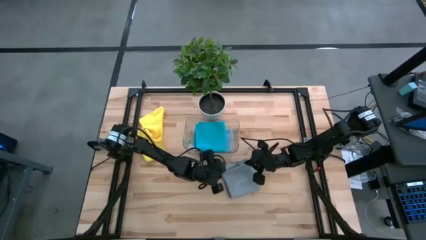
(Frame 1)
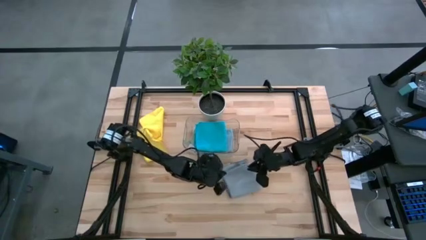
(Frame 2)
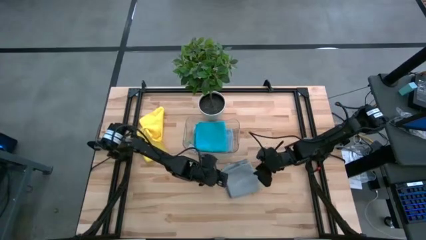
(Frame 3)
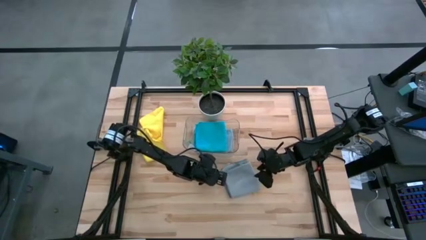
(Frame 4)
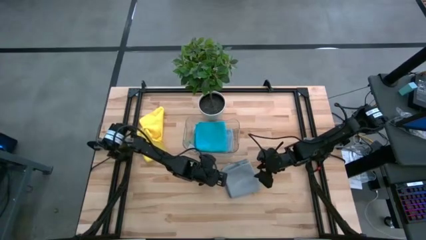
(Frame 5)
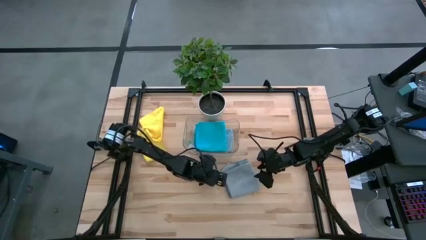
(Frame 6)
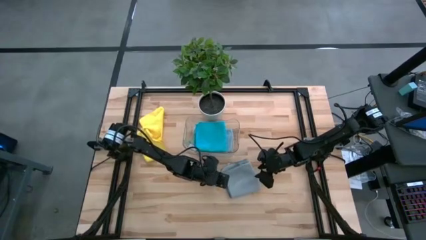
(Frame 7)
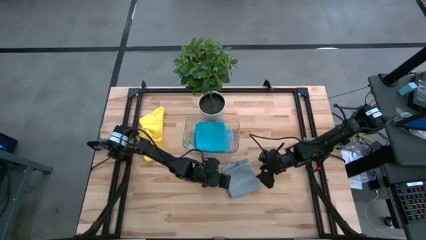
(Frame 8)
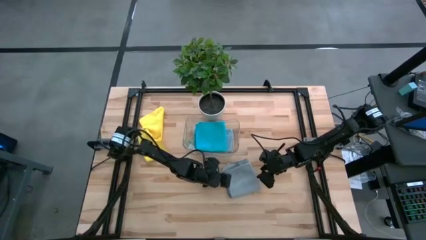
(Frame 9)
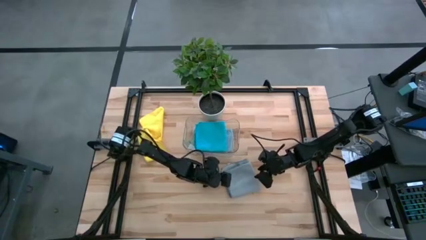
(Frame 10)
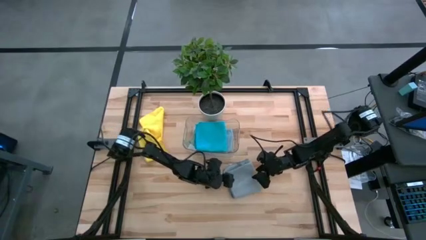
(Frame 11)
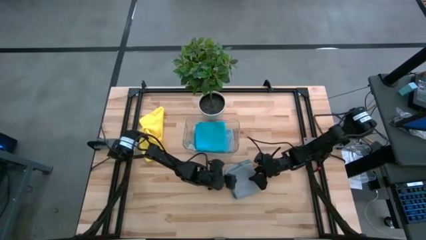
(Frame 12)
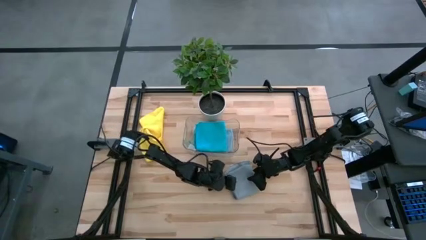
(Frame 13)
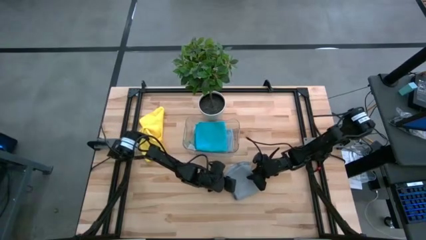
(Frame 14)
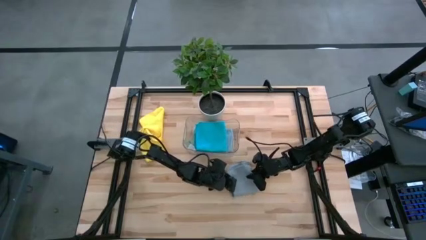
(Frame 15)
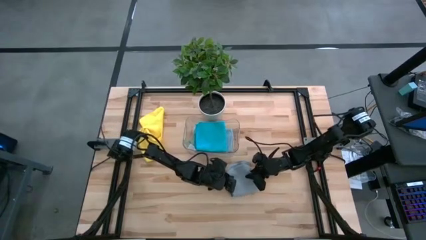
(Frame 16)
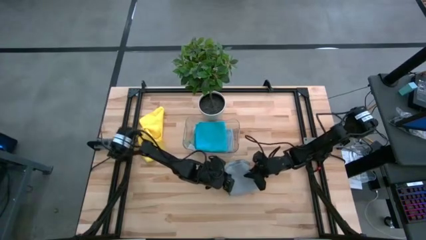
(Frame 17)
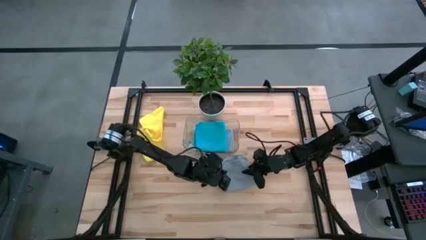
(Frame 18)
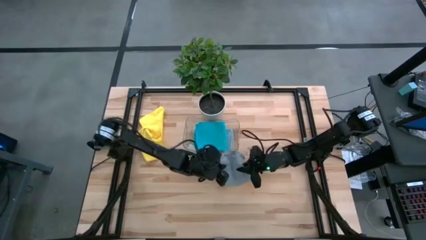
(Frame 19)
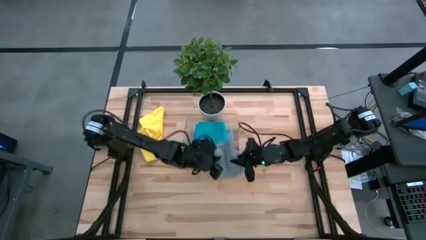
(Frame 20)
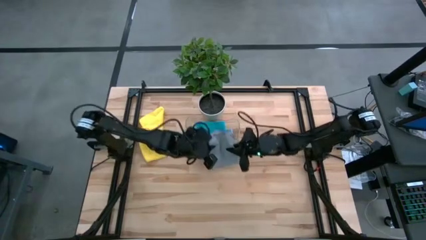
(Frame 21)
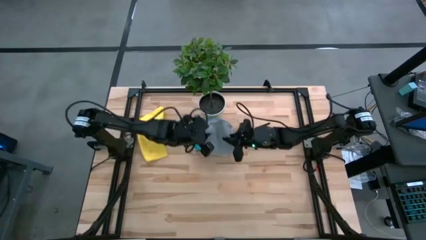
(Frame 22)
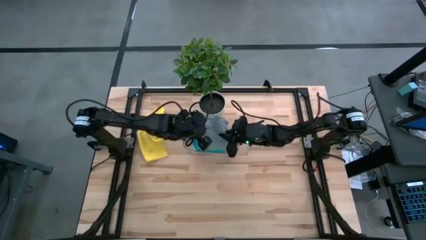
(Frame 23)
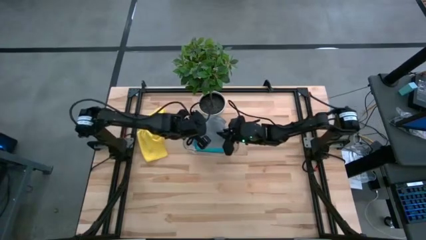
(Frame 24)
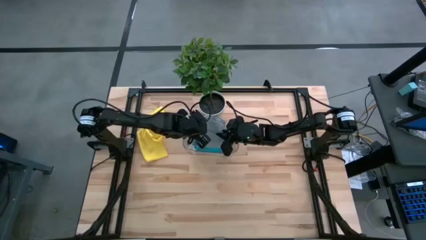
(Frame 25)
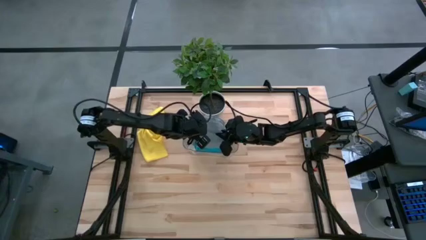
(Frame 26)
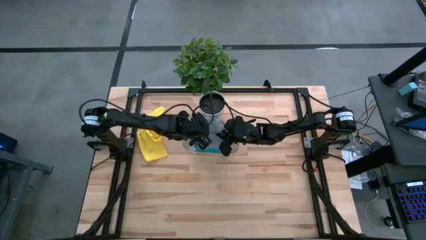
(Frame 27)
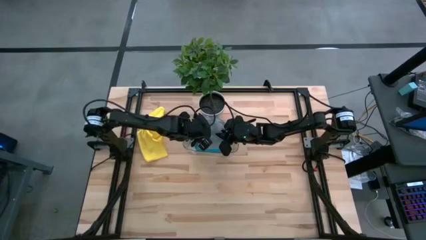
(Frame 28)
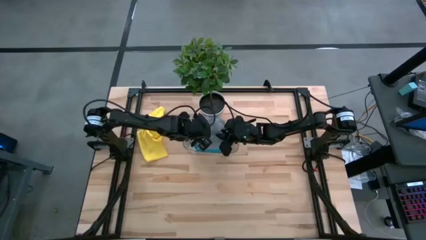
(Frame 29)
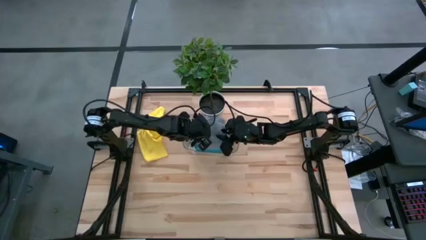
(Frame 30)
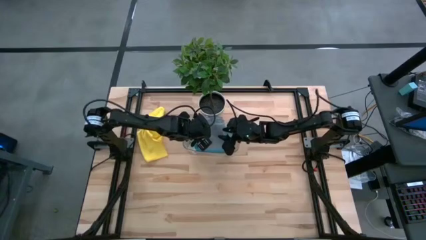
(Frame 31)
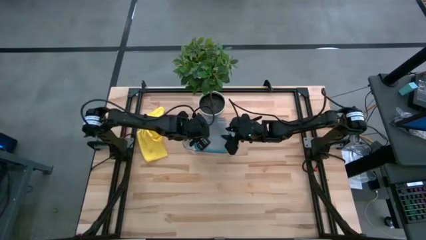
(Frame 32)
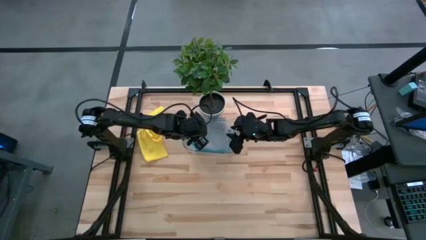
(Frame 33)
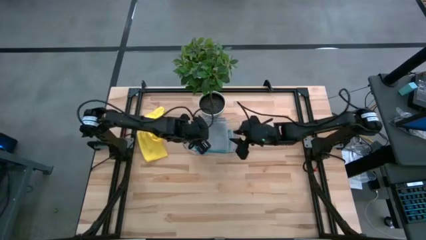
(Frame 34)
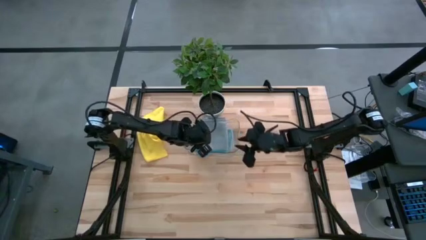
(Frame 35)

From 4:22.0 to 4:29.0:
Task: Fold microfiber towels
Stack the folded gray microfiber cloth on top of the folded blue microfiber cloth

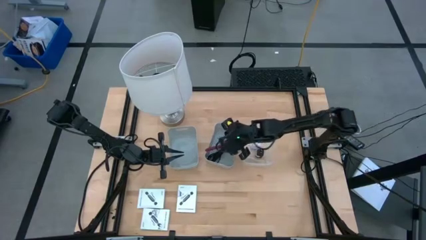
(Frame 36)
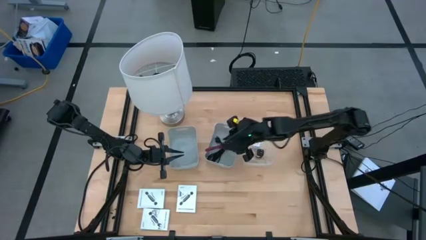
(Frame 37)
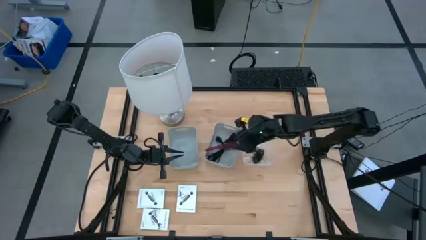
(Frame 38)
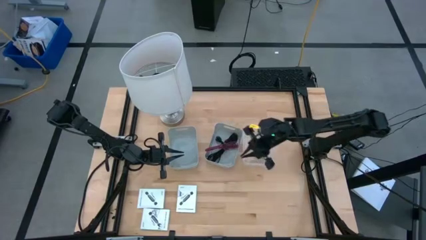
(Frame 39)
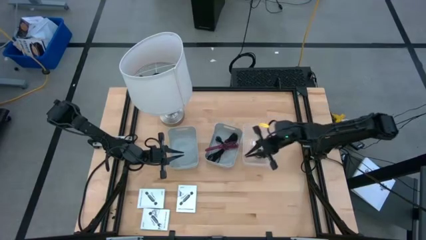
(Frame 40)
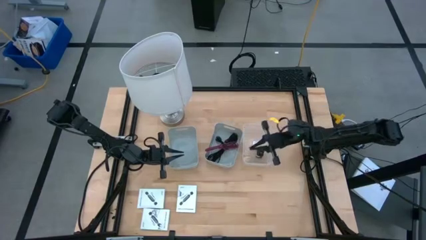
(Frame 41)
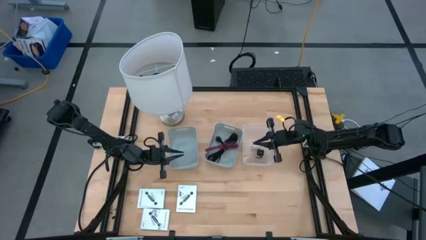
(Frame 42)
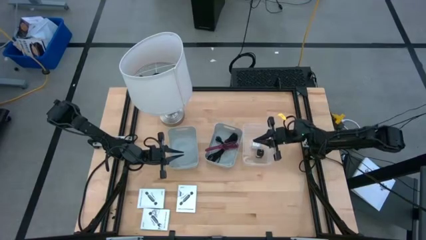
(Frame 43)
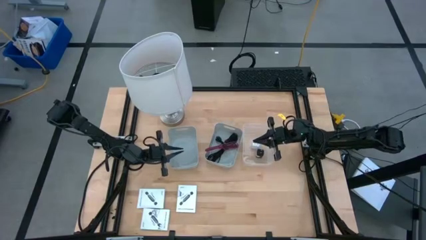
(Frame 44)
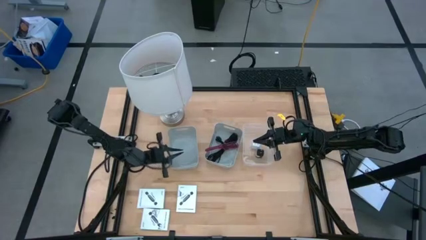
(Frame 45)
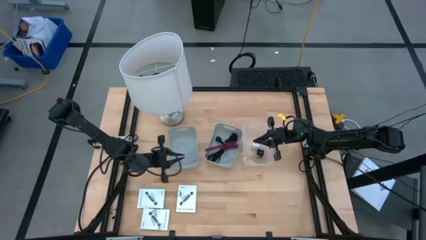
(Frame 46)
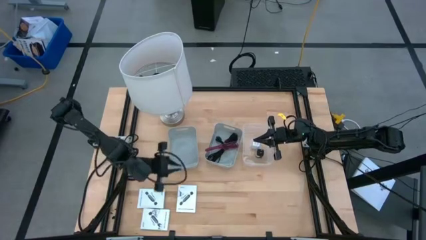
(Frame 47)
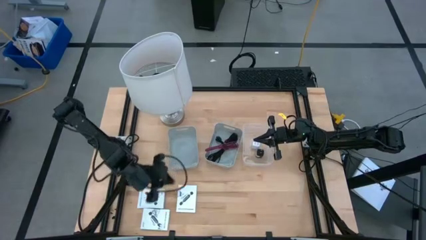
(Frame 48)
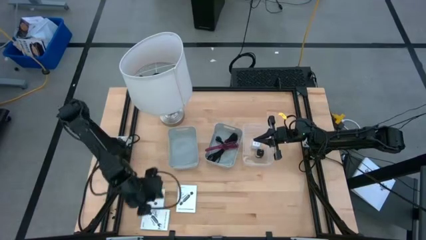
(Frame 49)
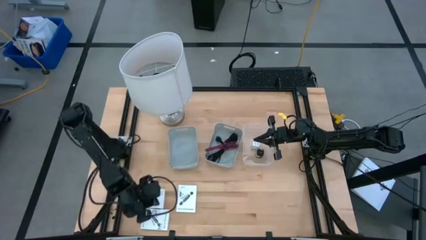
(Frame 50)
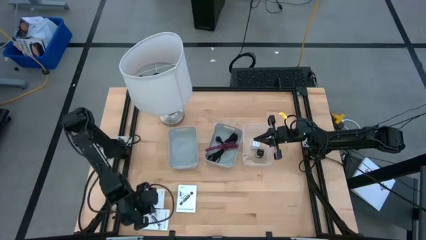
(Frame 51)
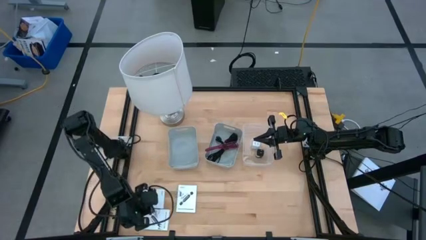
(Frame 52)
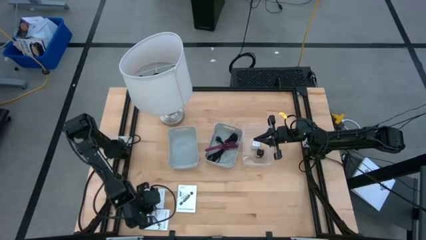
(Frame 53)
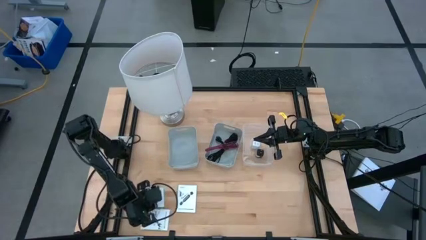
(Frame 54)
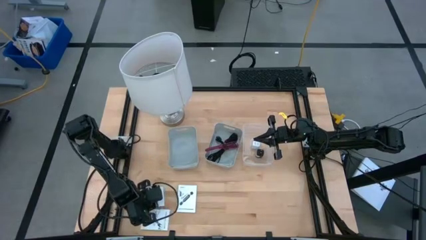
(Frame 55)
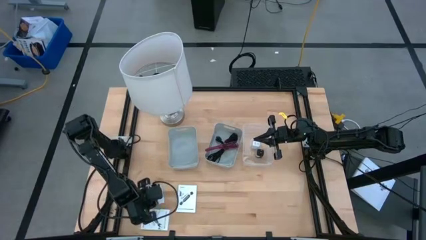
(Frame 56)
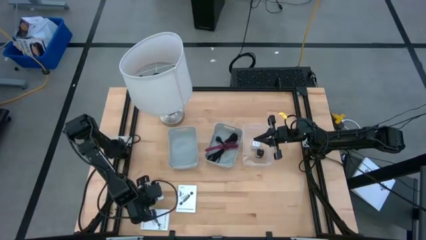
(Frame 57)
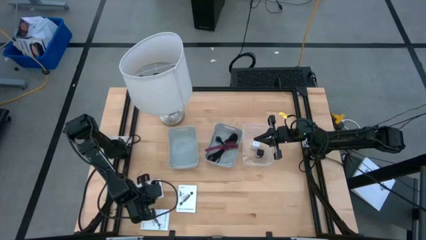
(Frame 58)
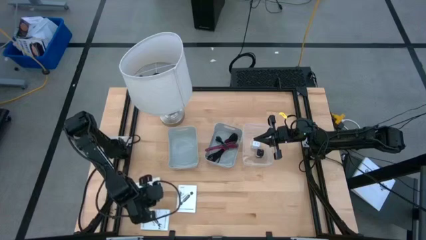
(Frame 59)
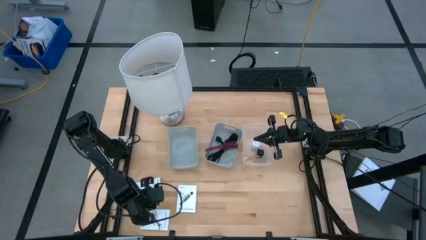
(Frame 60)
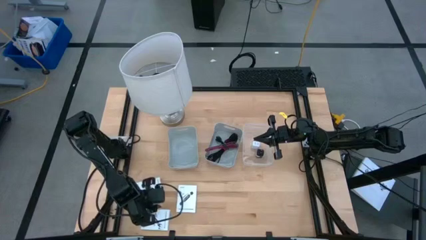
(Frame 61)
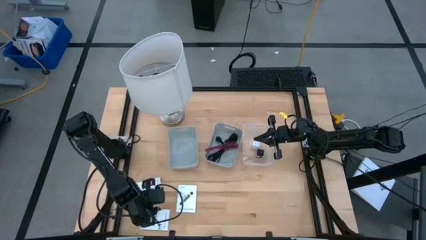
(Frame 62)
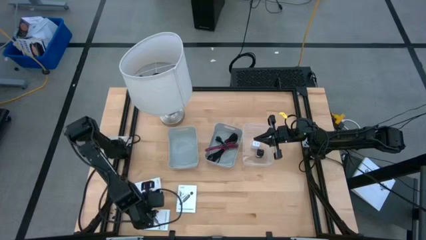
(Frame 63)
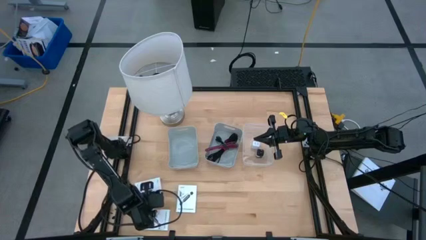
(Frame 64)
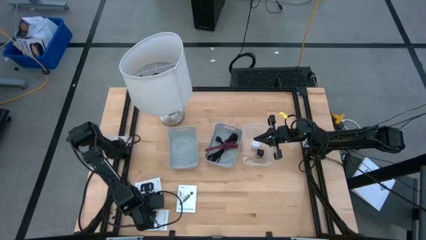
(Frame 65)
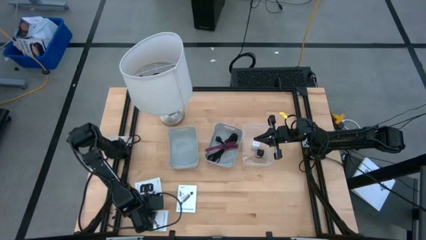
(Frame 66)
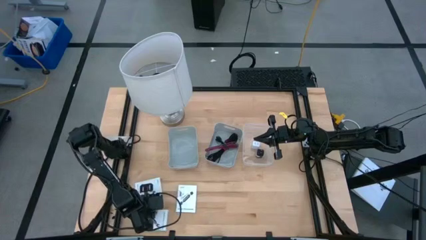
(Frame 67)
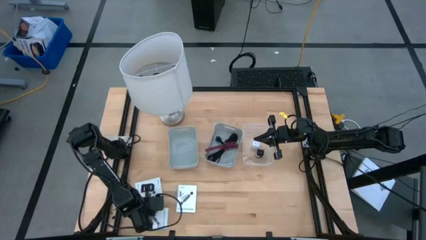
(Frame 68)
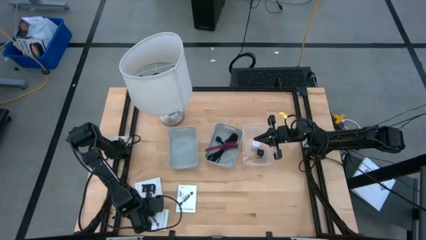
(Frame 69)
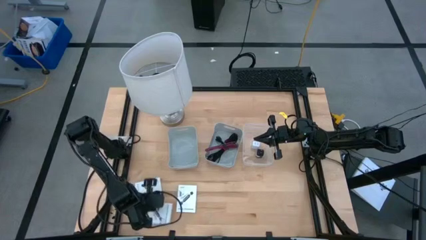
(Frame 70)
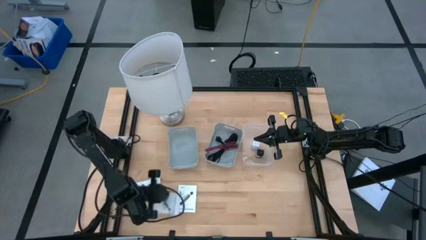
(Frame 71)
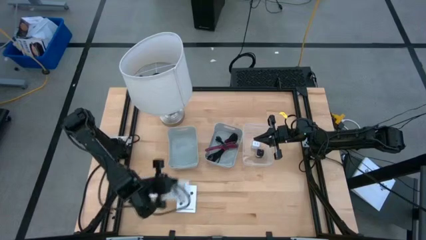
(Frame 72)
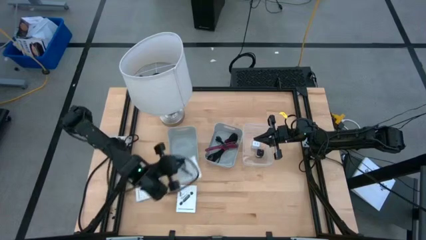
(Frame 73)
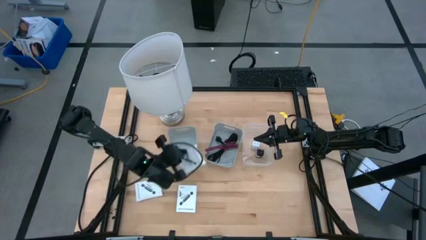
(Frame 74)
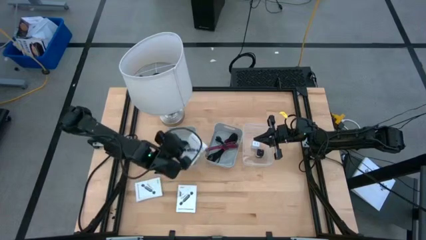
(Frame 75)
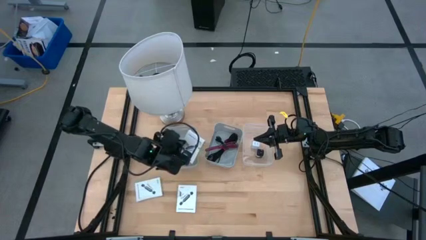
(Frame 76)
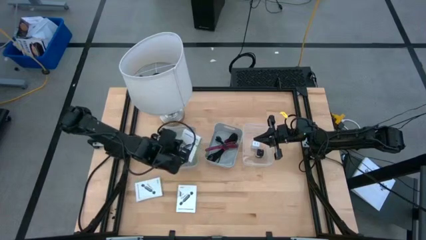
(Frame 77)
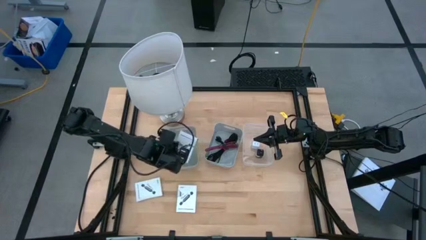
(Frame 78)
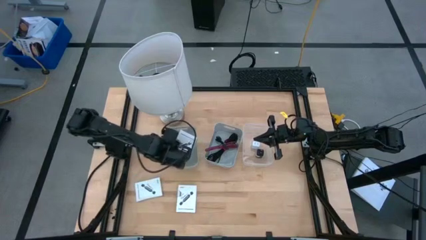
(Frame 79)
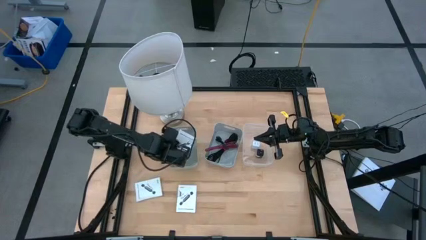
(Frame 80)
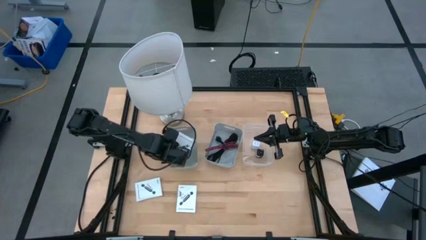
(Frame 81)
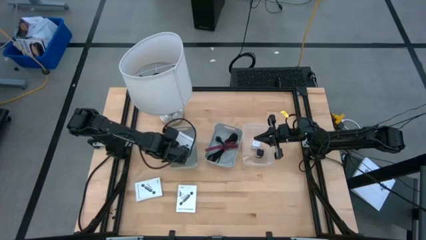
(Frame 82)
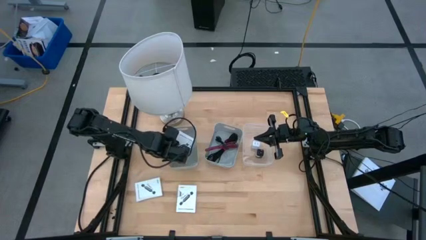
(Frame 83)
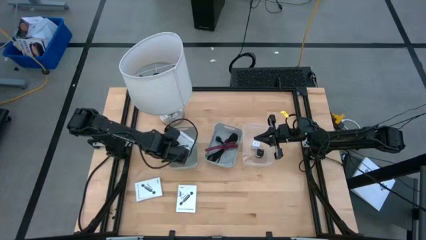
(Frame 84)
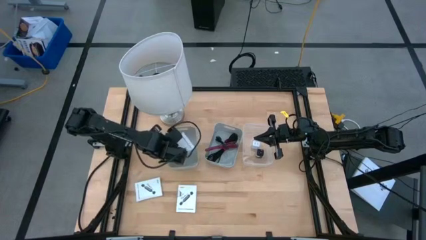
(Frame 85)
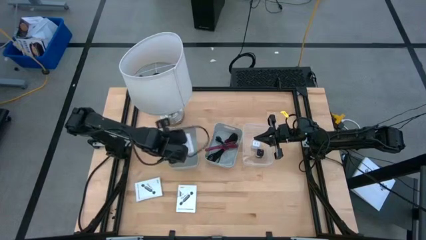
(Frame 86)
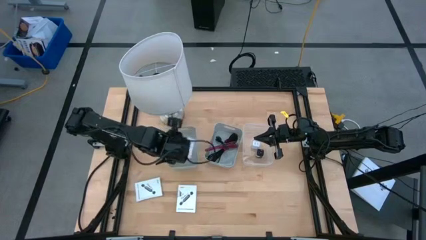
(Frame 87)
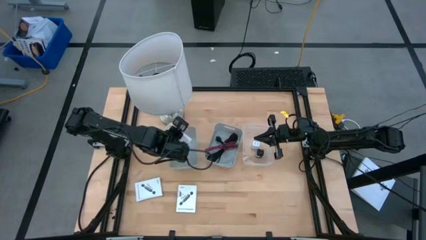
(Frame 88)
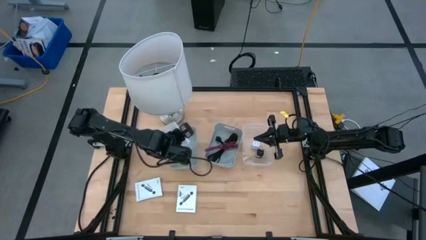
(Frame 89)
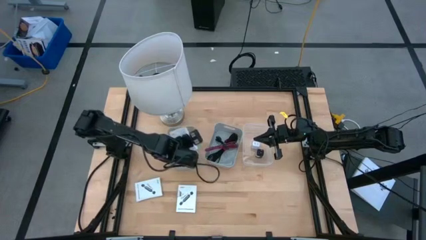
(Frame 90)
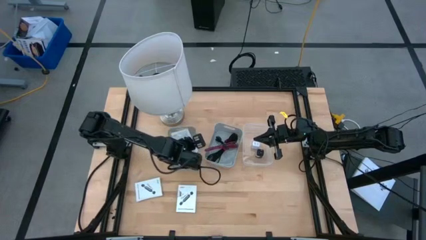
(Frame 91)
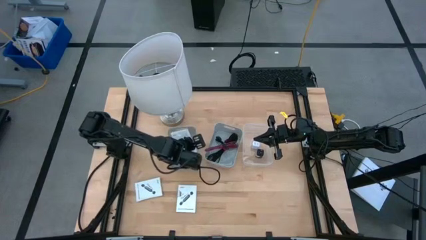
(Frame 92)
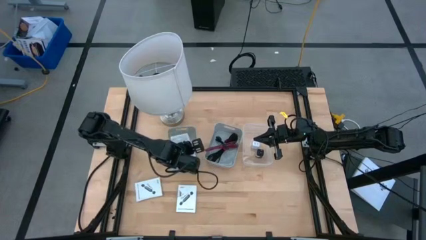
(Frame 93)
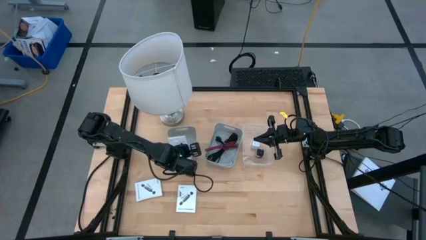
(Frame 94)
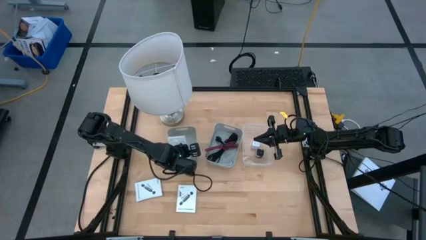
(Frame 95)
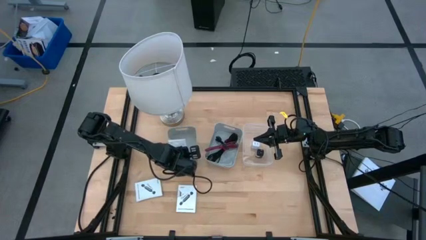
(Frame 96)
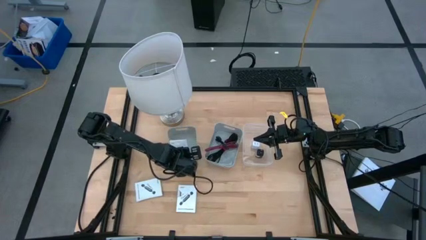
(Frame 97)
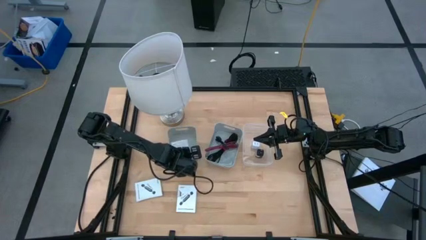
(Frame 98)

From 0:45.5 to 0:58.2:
Task: Pick and place items into bin
Put the bottom card reader box into the left gray bin
